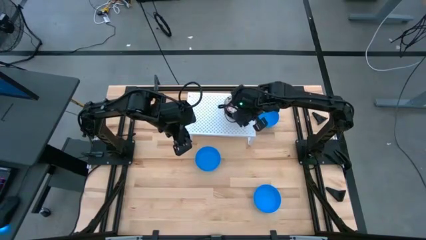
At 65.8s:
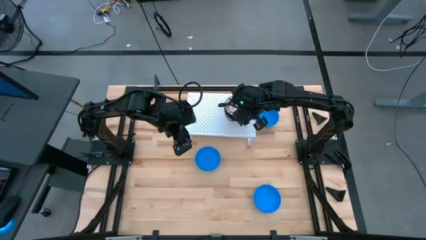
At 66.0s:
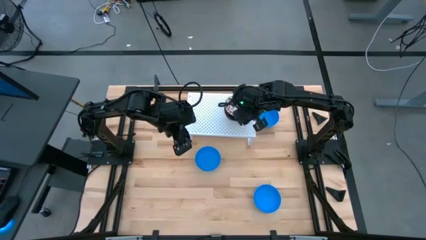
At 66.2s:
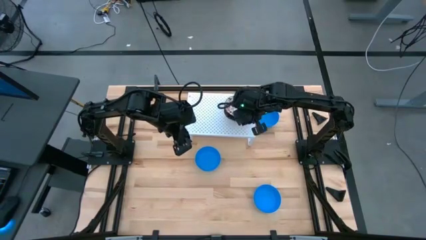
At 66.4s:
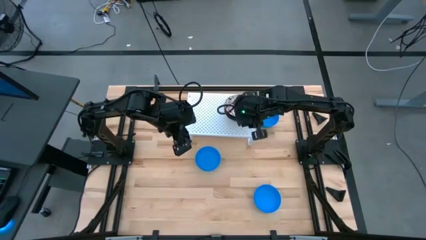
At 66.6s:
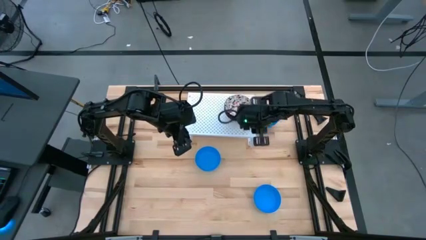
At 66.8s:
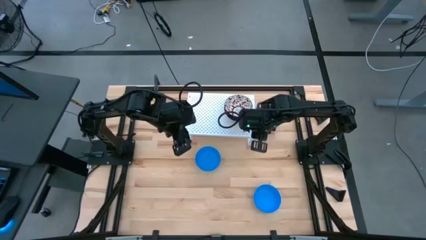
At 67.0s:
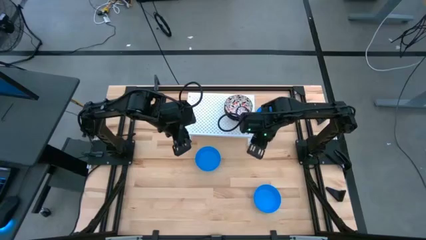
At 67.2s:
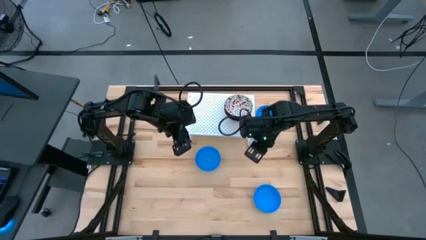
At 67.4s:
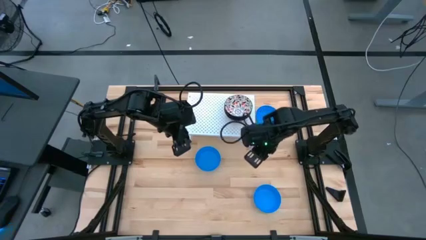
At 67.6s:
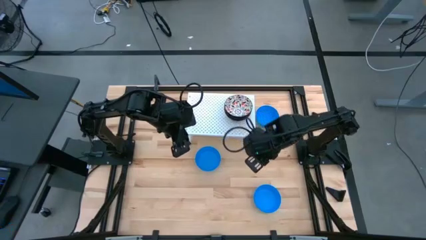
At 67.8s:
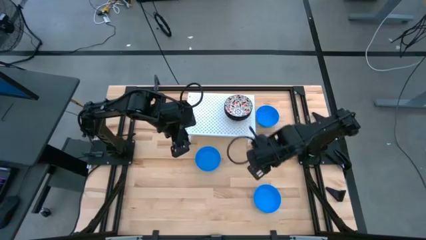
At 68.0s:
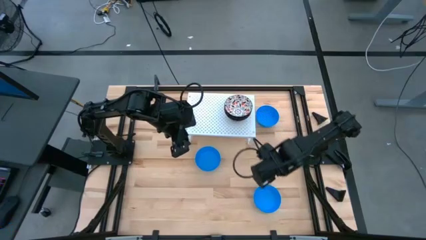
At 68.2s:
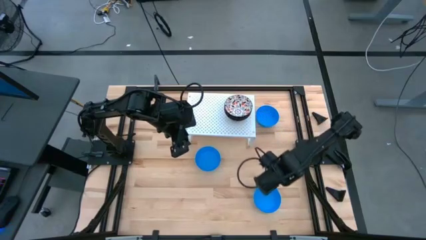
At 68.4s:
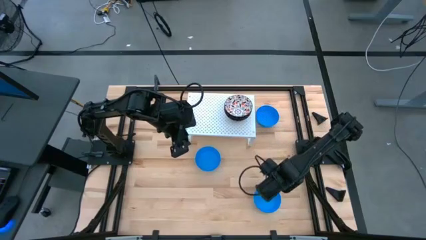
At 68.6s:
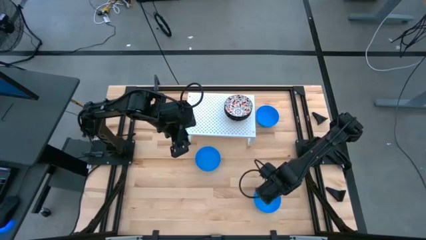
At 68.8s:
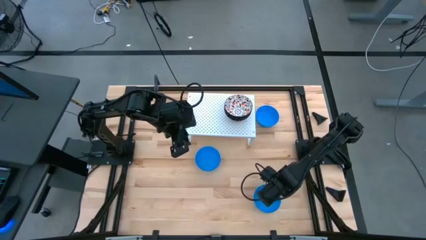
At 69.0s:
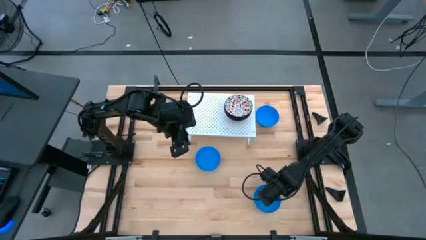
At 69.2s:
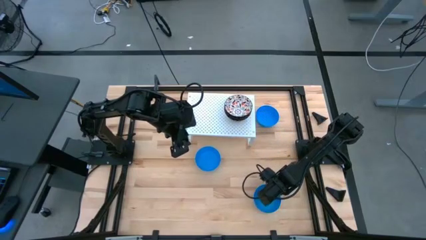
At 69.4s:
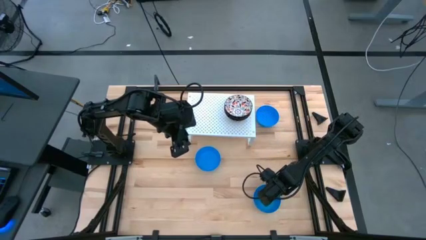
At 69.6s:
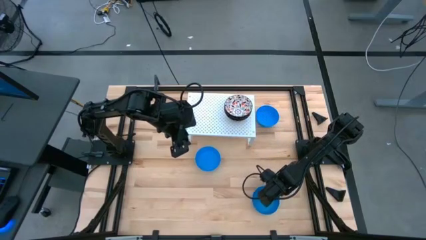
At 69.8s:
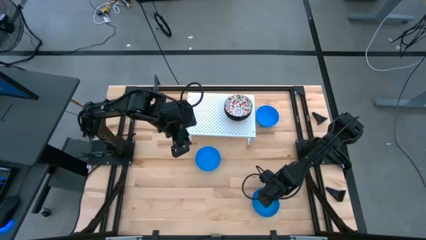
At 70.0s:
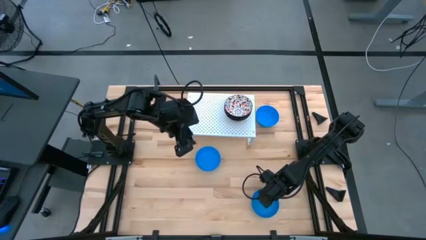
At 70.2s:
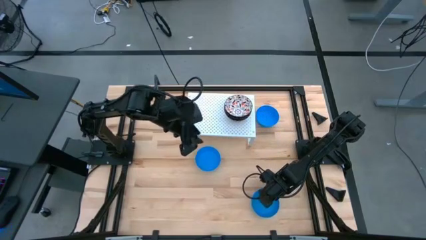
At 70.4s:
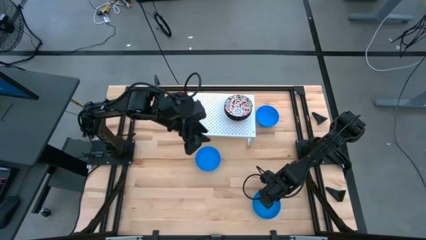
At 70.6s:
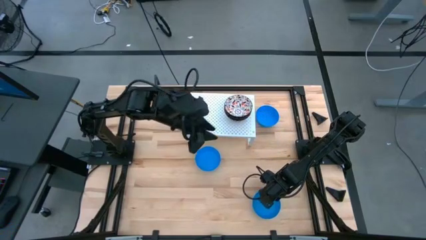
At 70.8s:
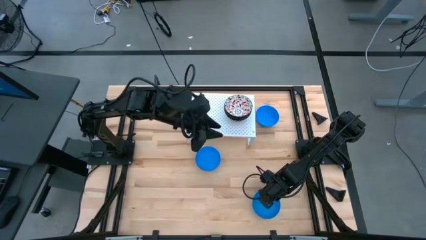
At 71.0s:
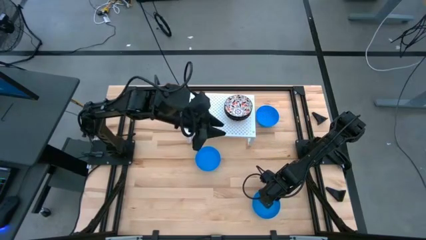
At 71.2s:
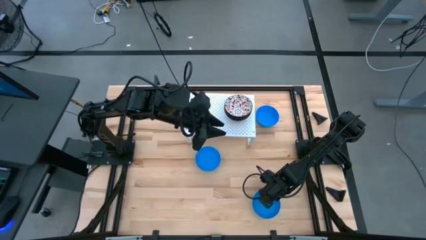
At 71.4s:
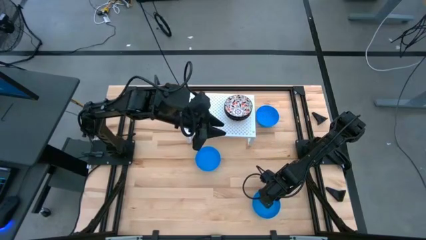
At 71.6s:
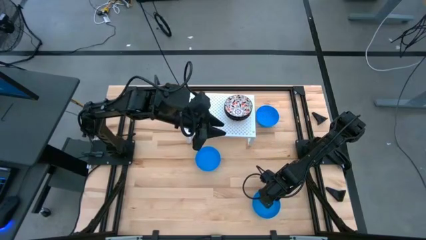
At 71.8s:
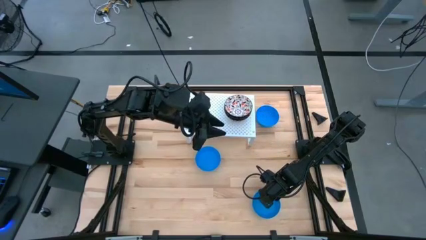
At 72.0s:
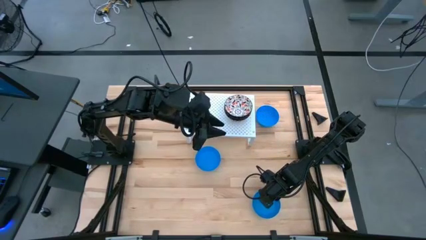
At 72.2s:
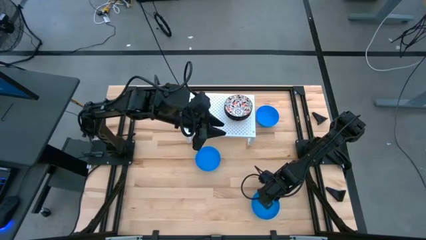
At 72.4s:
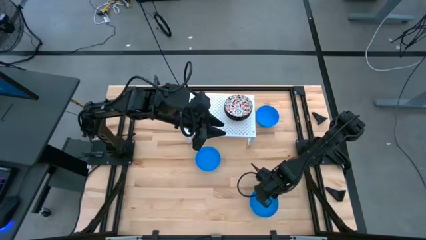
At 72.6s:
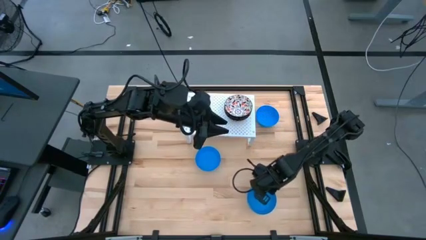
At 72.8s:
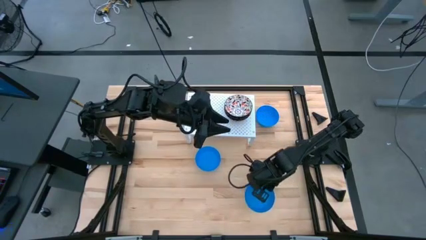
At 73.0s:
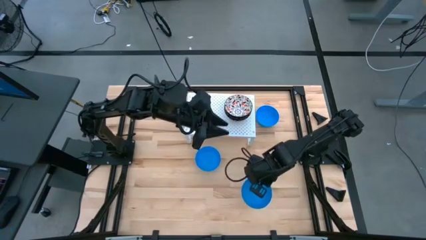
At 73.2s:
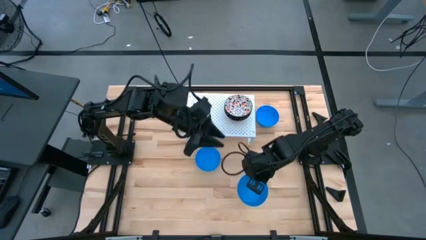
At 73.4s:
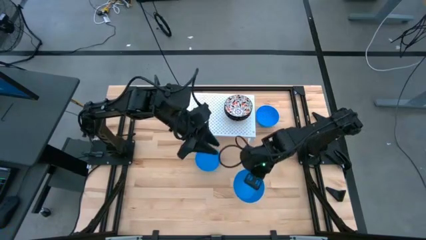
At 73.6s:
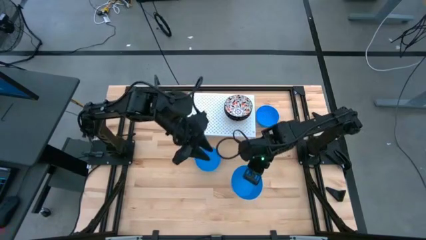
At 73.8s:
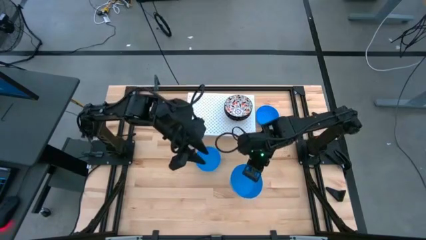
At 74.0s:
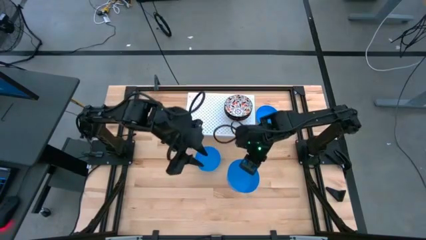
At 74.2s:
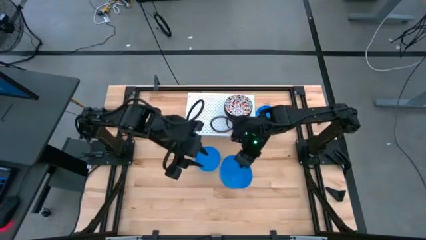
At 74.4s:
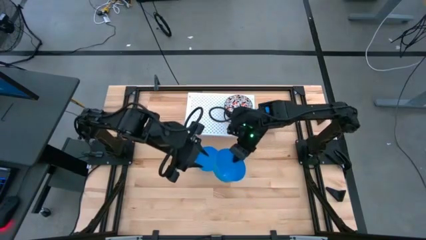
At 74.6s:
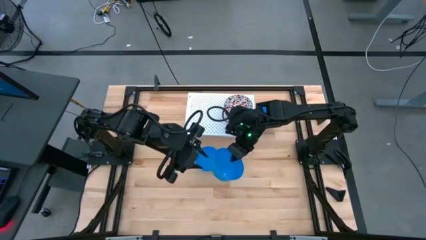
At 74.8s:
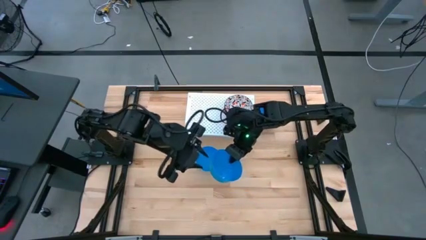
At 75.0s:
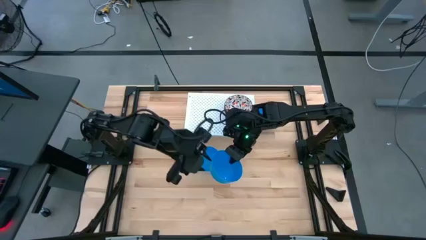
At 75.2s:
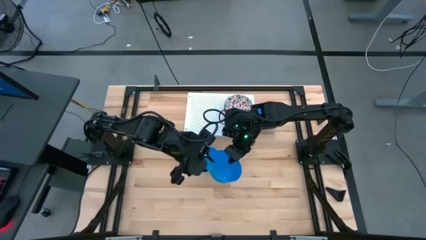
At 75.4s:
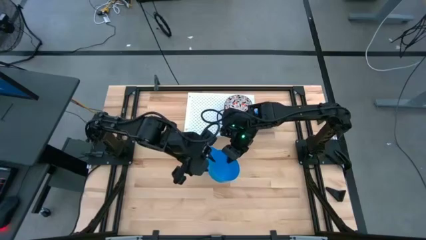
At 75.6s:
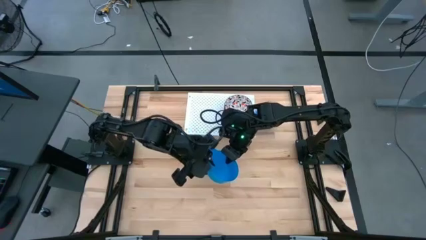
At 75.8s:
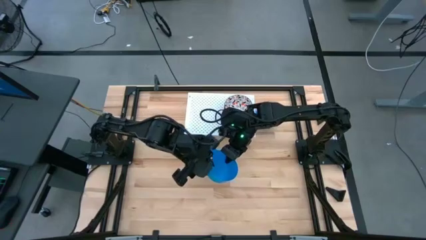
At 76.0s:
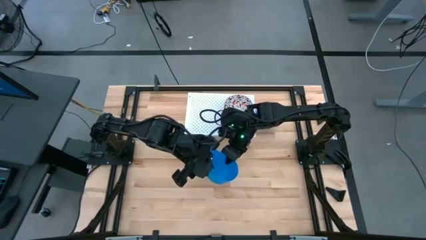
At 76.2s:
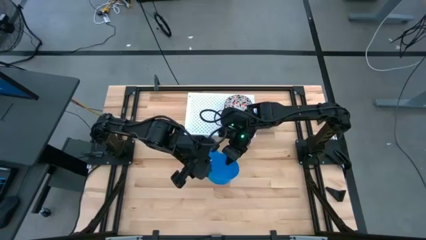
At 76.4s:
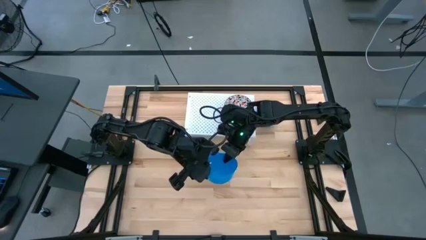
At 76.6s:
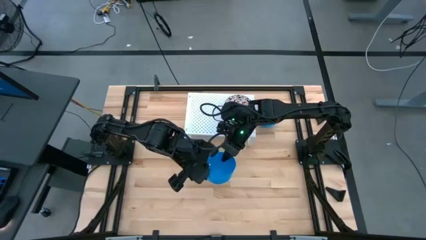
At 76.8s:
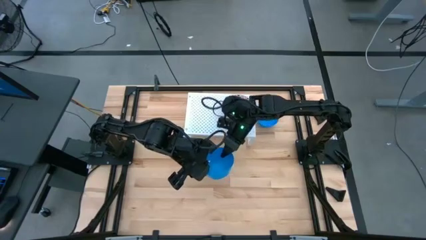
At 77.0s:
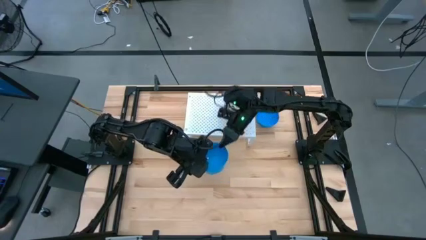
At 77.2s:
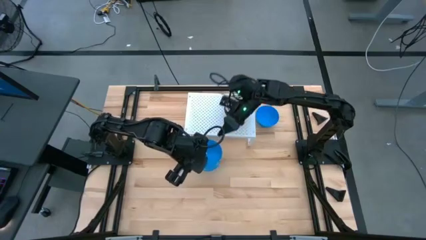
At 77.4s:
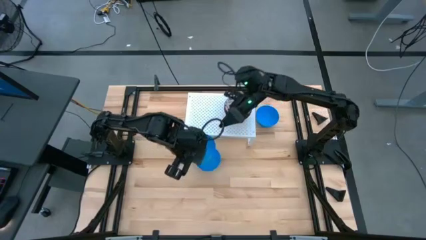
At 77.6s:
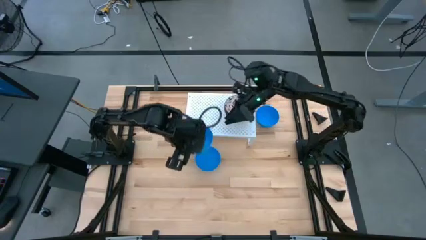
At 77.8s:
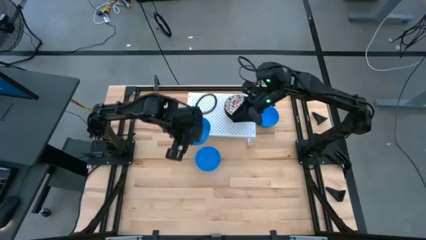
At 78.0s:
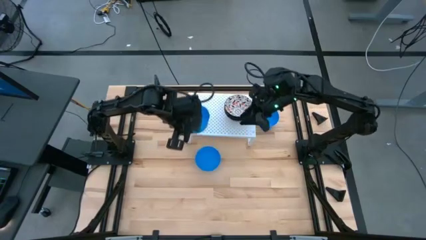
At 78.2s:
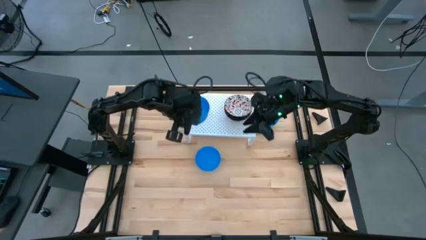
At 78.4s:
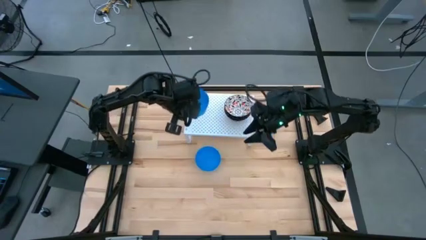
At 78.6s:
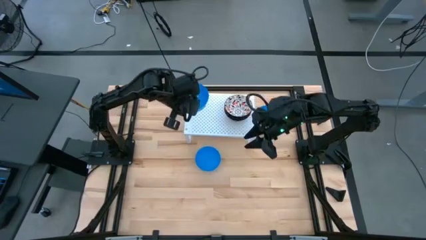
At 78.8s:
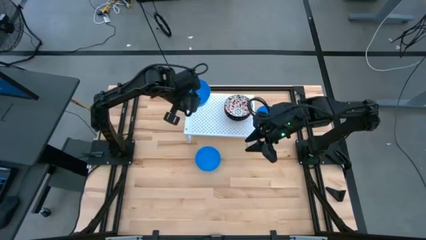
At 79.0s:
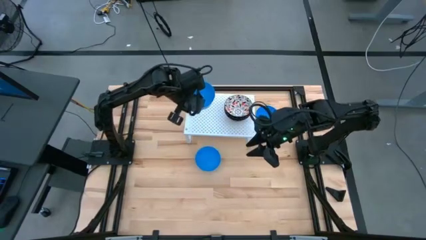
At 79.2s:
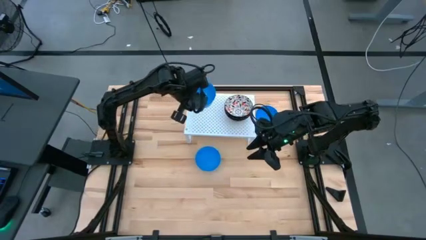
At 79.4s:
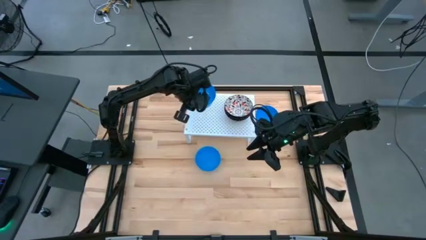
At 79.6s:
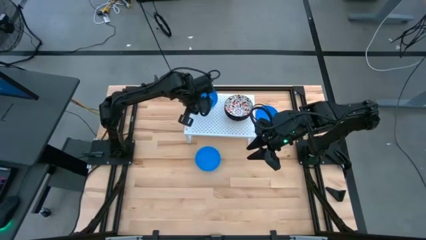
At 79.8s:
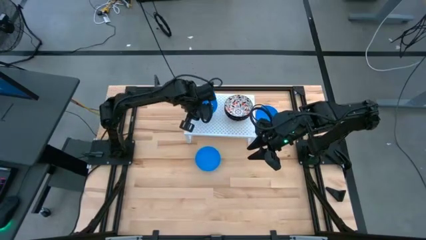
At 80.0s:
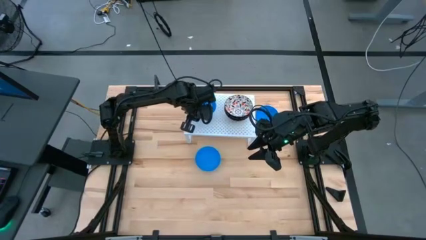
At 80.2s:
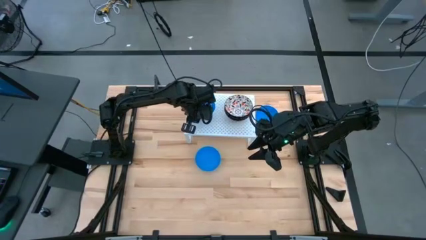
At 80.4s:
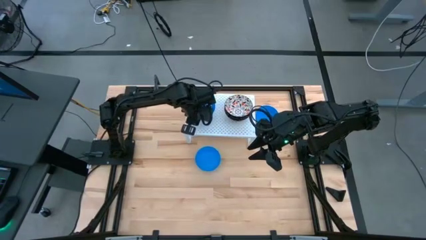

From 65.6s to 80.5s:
Task: Pick & Place Mini bowls
Put the bottom right blue bowl on the shelf

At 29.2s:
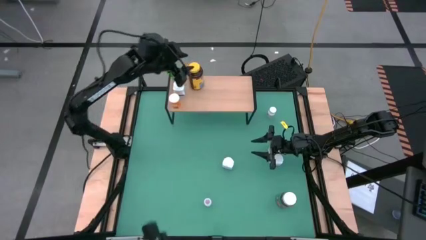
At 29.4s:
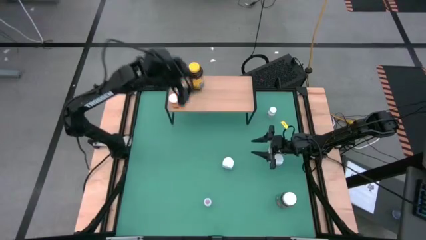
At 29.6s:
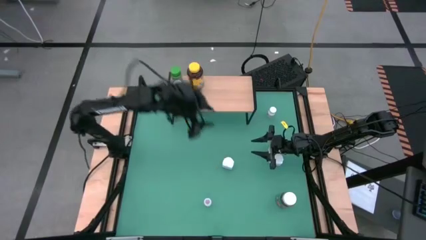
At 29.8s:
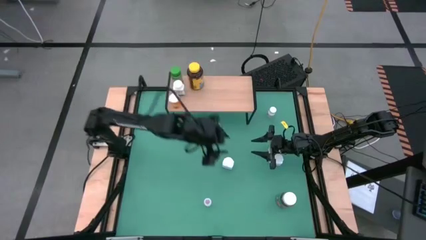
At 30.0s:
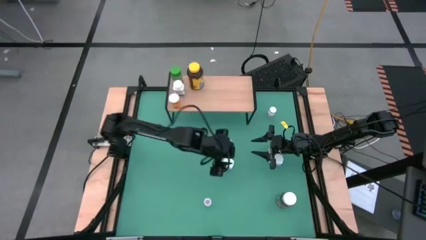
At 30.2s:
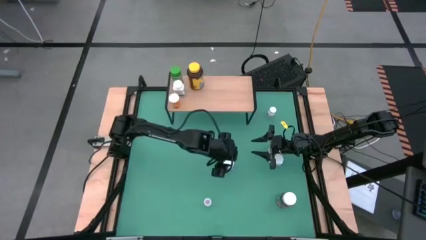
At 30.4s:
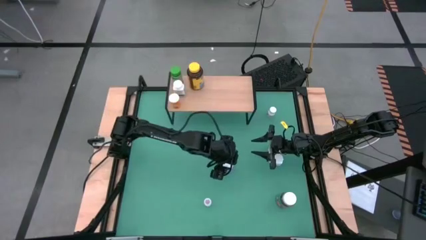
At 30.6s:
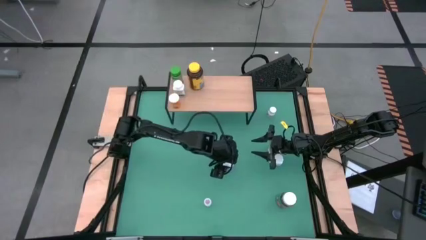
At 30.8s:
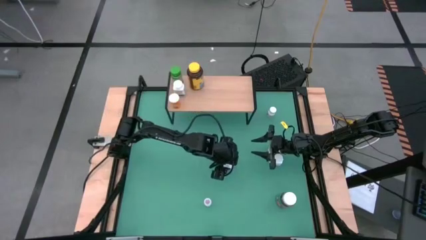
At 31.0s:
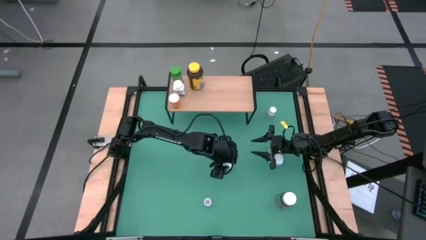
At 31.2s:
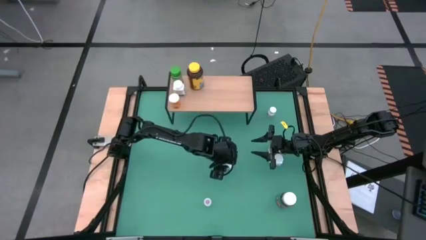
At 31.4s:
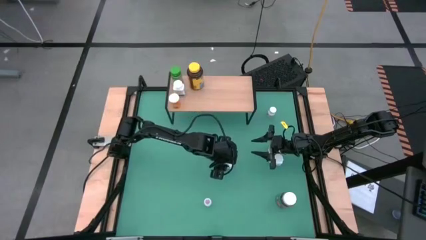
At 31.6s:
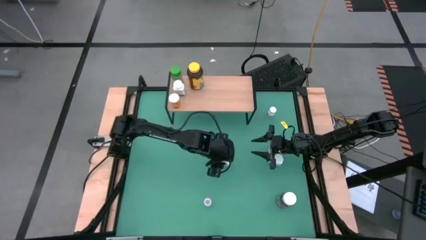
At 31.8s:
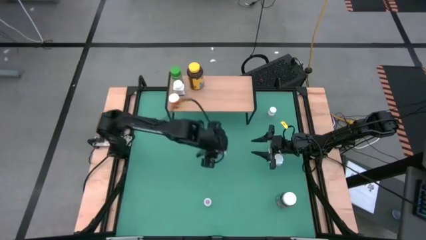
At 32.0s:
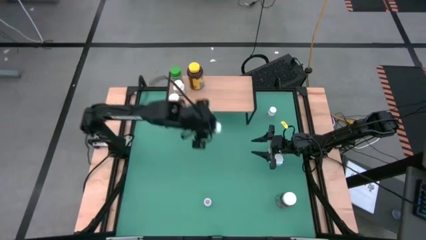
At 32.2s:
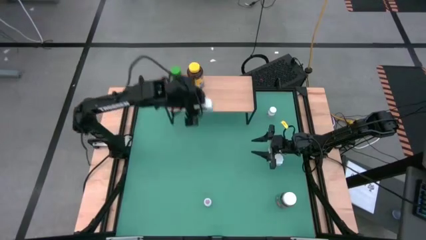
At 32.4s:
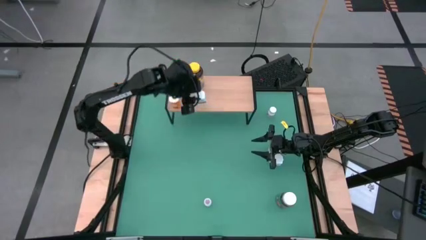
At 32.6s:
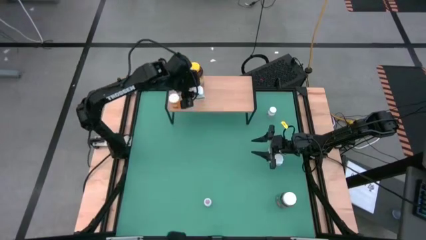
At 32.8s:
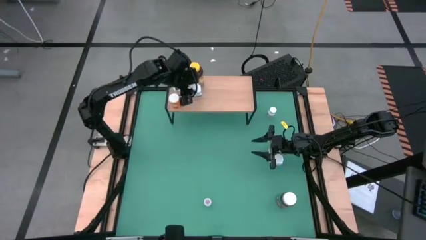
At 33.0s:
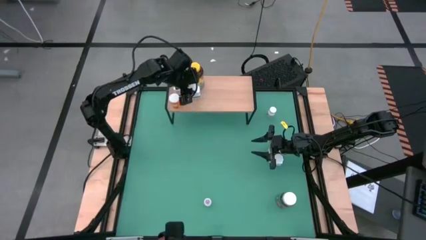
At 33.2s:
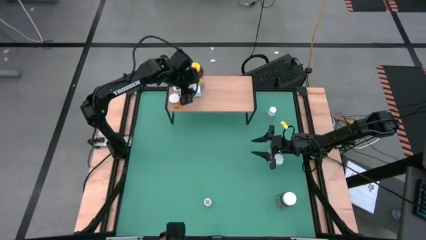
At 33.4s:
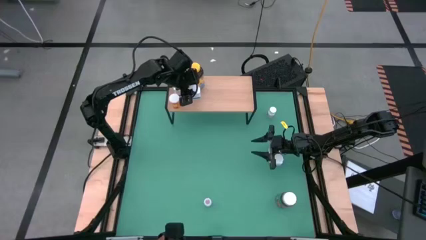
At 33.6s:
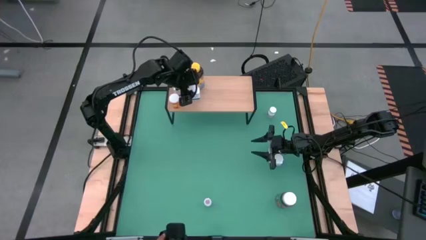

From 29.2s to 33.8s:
Task: Pick and place medicine bottles onto shelf by color
Put the left white and blue pill bottle on the shelf
